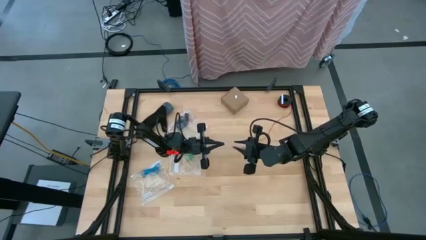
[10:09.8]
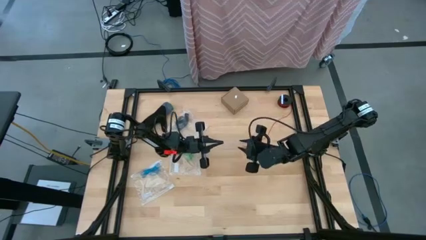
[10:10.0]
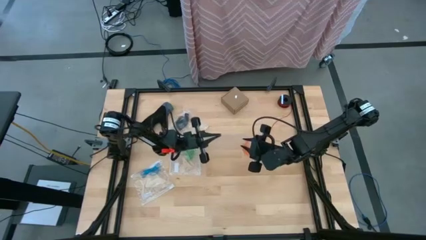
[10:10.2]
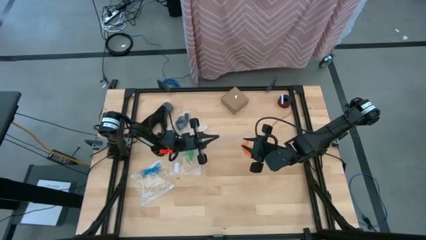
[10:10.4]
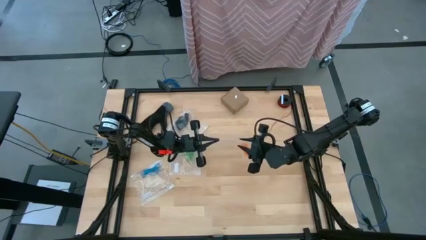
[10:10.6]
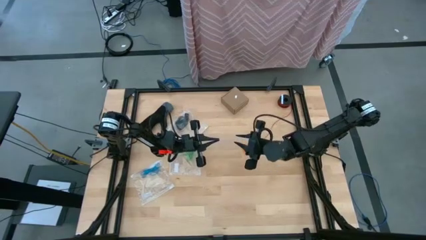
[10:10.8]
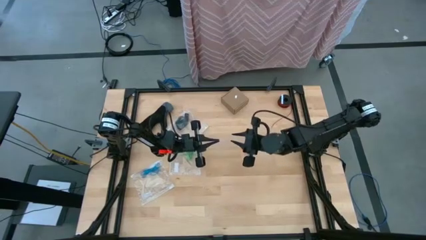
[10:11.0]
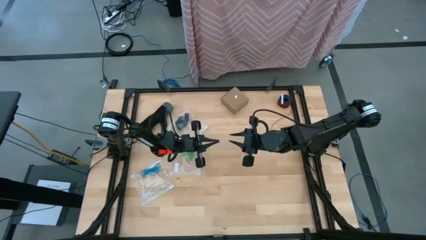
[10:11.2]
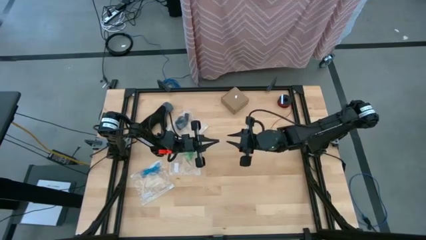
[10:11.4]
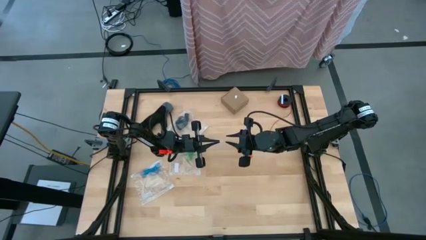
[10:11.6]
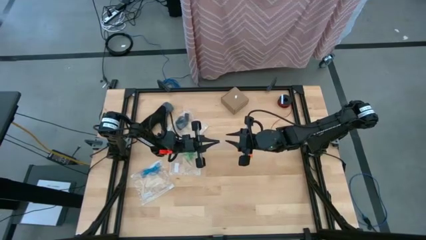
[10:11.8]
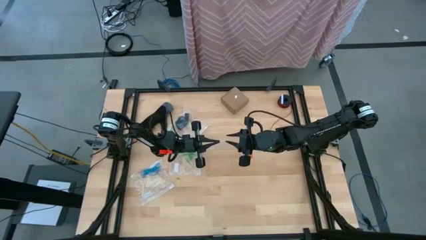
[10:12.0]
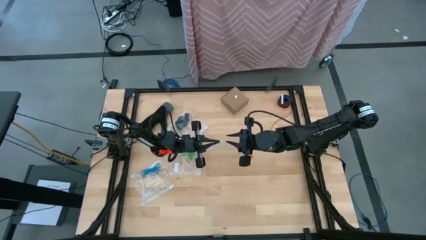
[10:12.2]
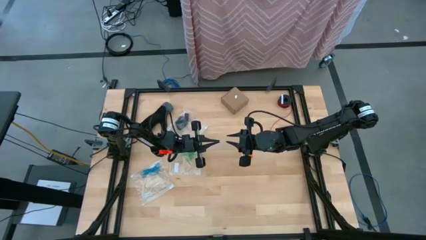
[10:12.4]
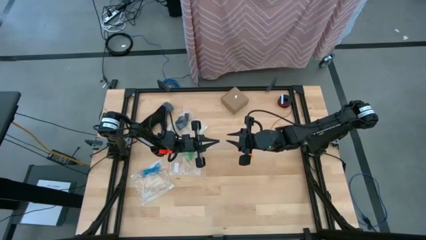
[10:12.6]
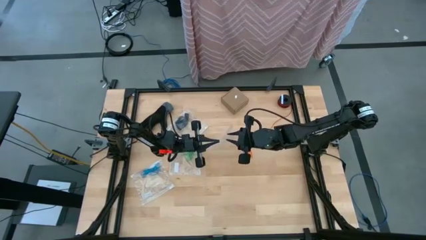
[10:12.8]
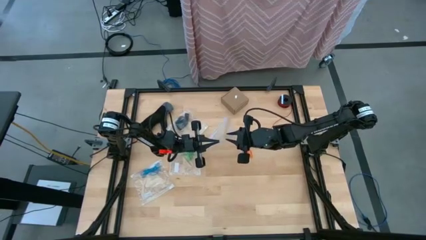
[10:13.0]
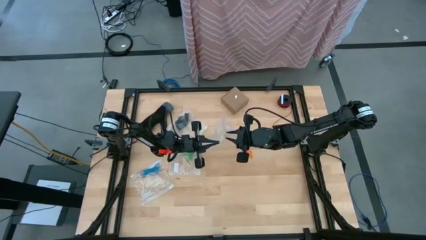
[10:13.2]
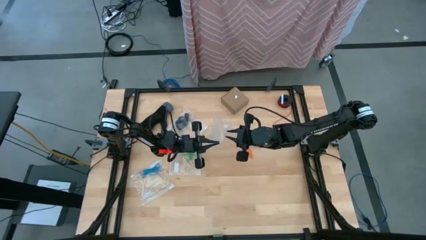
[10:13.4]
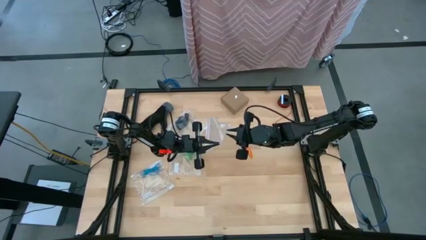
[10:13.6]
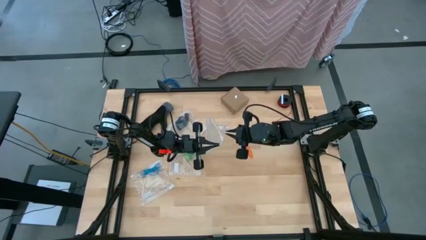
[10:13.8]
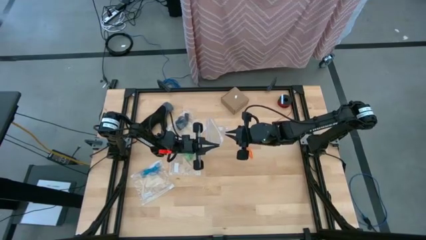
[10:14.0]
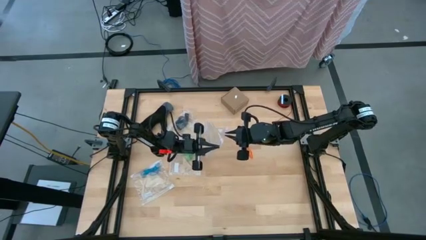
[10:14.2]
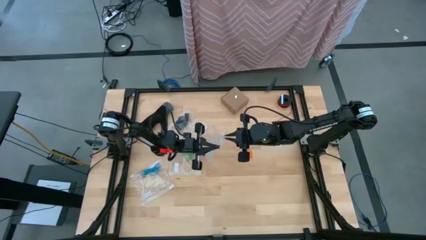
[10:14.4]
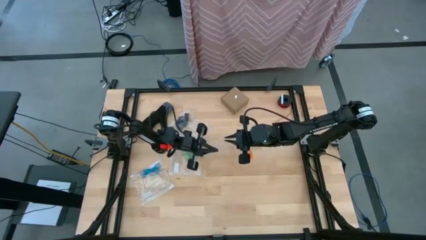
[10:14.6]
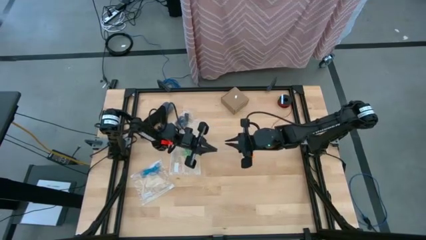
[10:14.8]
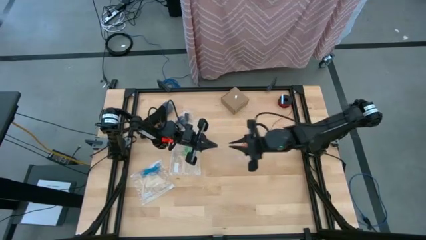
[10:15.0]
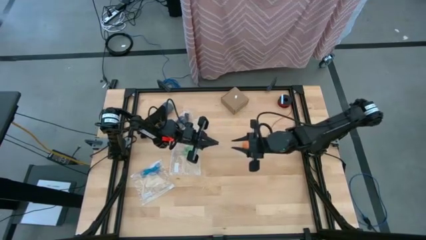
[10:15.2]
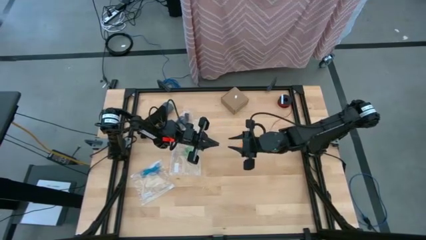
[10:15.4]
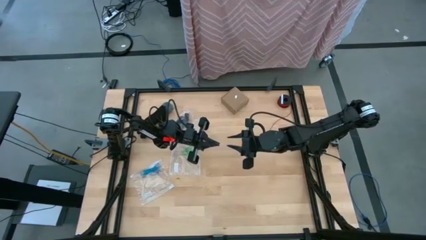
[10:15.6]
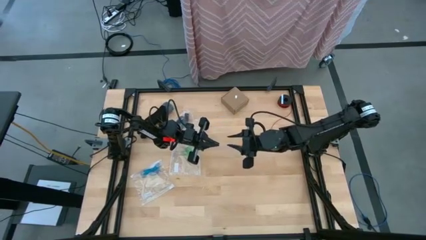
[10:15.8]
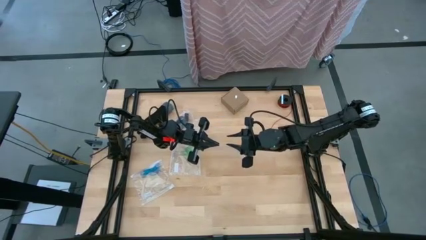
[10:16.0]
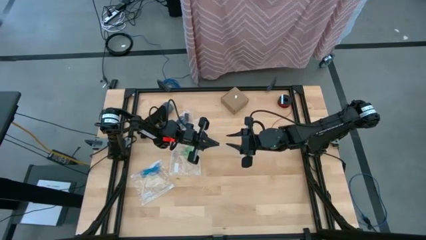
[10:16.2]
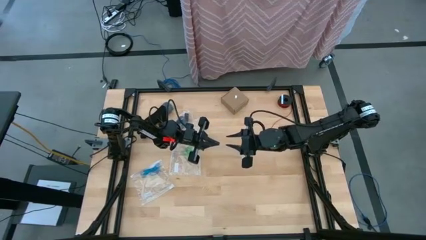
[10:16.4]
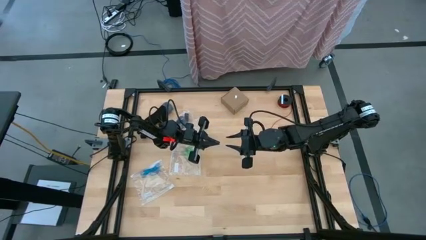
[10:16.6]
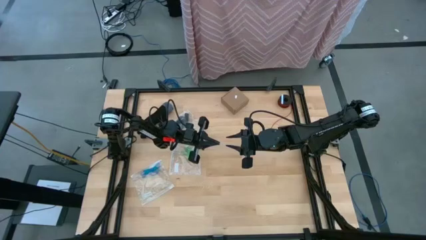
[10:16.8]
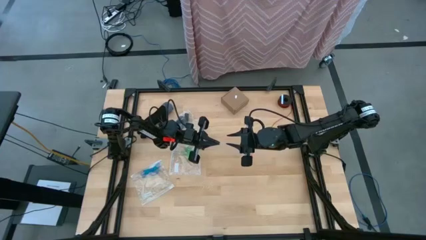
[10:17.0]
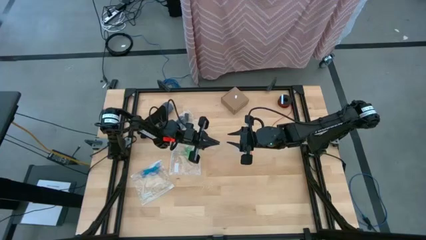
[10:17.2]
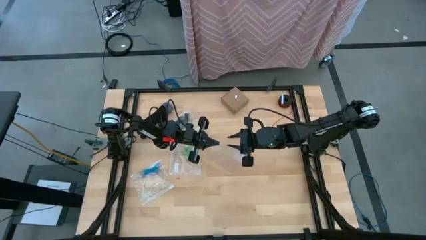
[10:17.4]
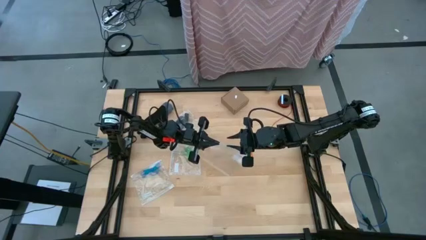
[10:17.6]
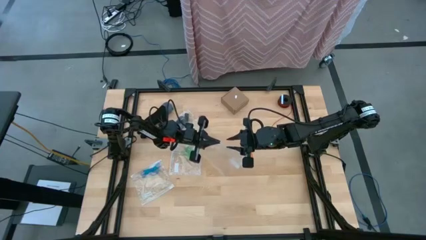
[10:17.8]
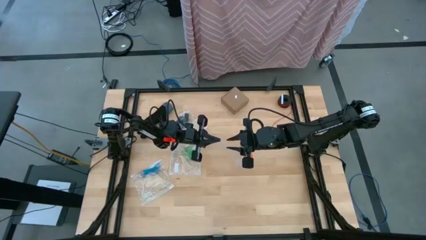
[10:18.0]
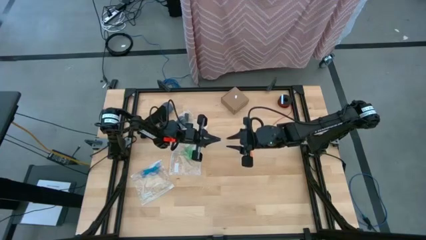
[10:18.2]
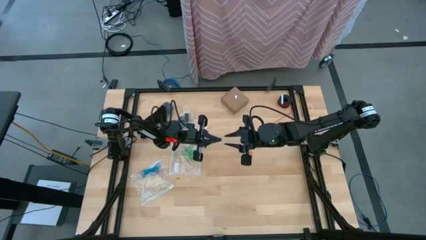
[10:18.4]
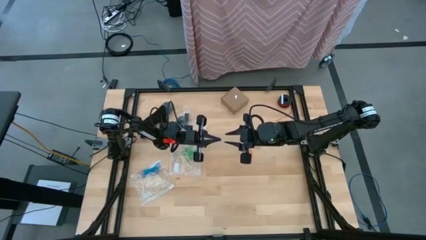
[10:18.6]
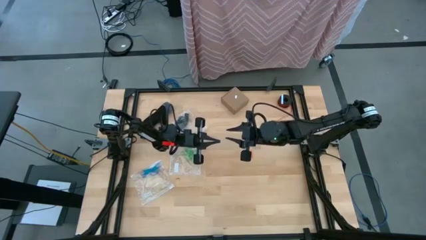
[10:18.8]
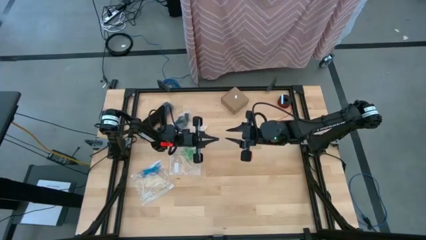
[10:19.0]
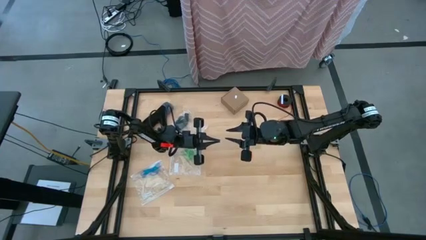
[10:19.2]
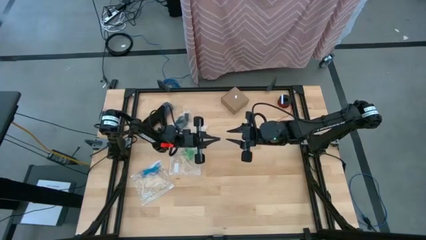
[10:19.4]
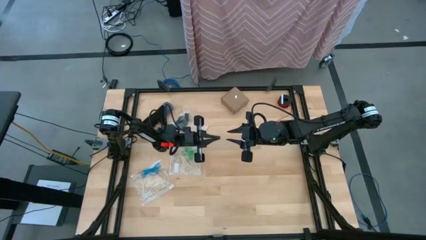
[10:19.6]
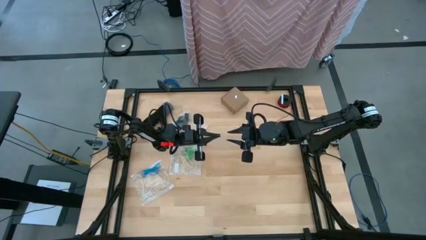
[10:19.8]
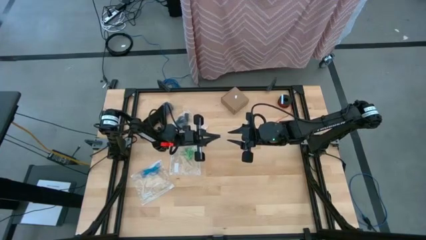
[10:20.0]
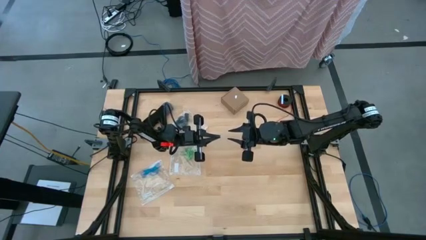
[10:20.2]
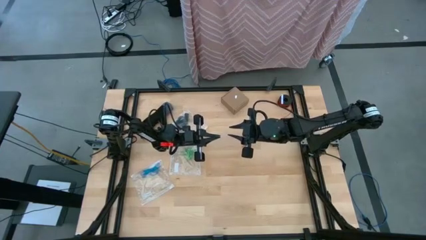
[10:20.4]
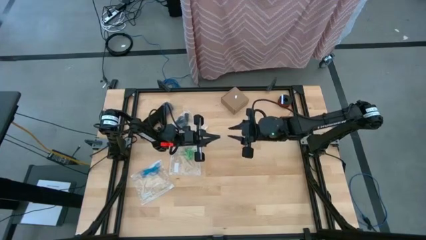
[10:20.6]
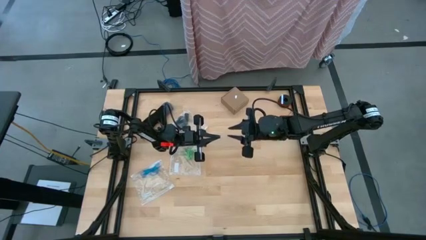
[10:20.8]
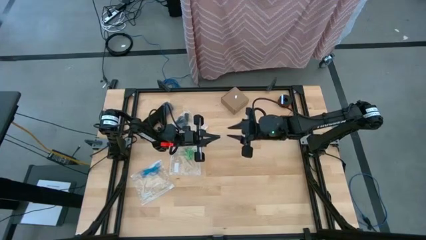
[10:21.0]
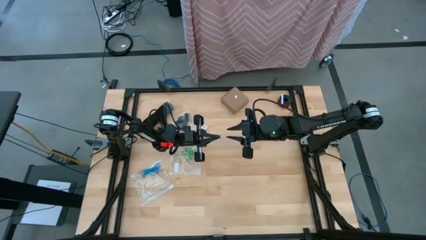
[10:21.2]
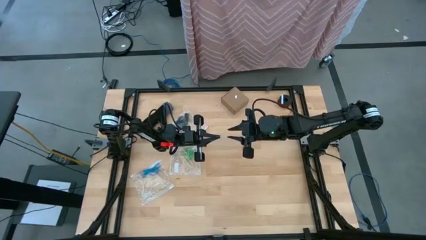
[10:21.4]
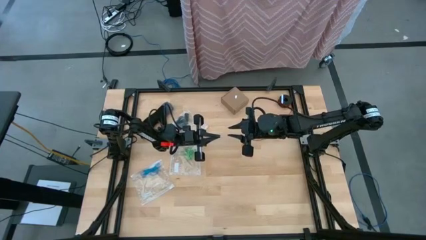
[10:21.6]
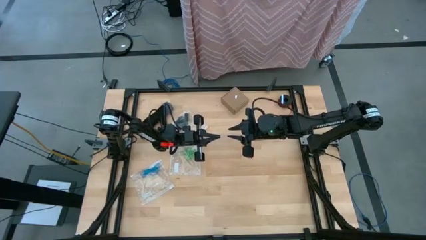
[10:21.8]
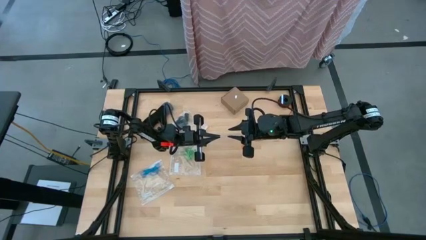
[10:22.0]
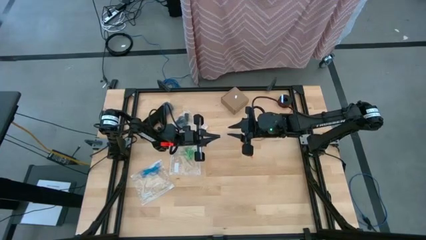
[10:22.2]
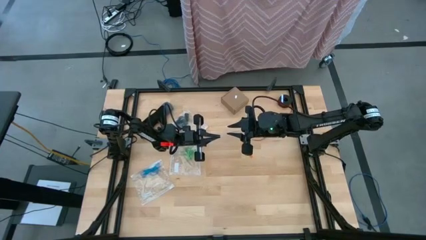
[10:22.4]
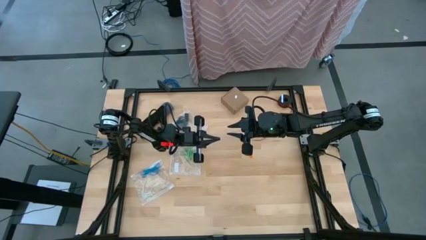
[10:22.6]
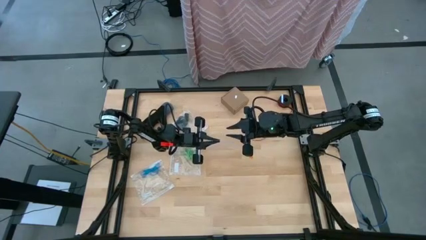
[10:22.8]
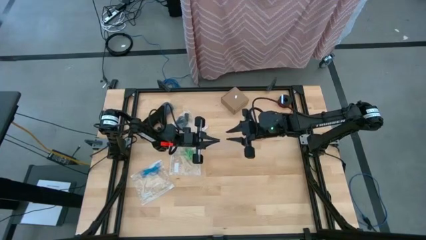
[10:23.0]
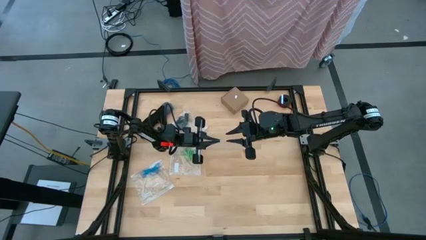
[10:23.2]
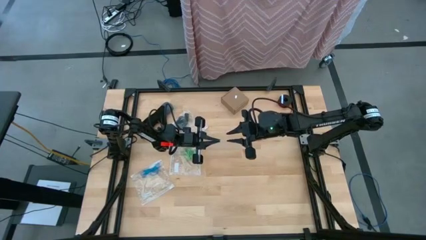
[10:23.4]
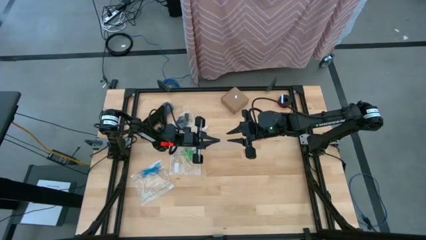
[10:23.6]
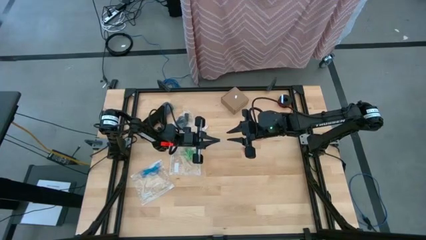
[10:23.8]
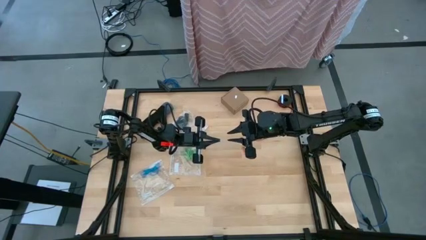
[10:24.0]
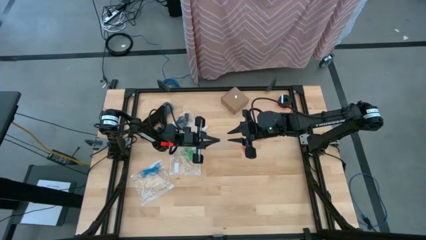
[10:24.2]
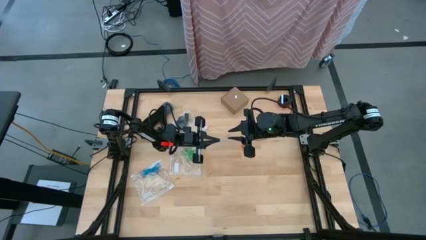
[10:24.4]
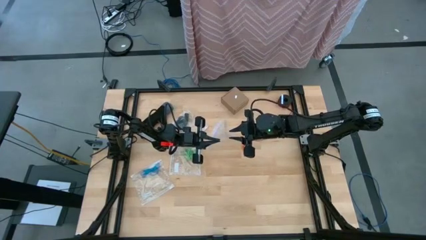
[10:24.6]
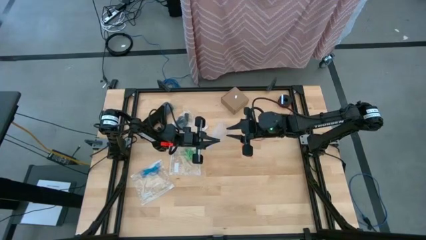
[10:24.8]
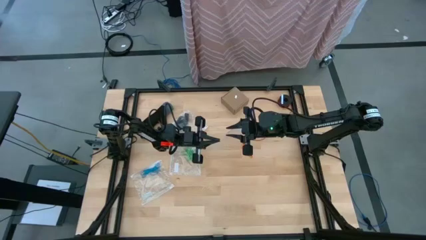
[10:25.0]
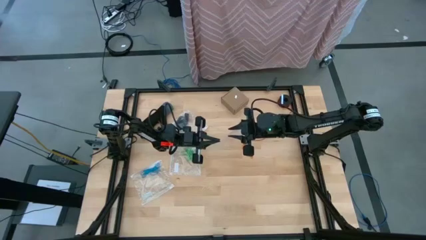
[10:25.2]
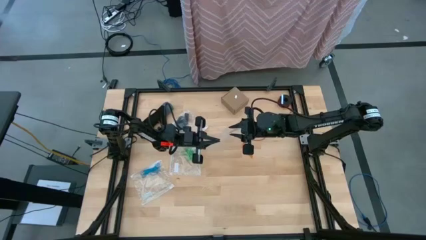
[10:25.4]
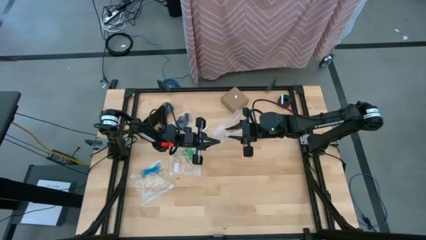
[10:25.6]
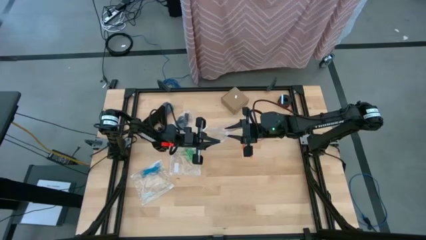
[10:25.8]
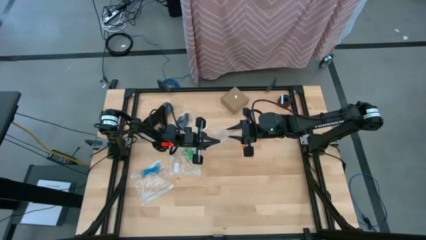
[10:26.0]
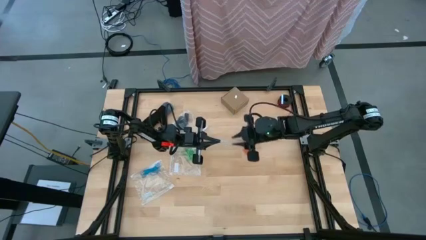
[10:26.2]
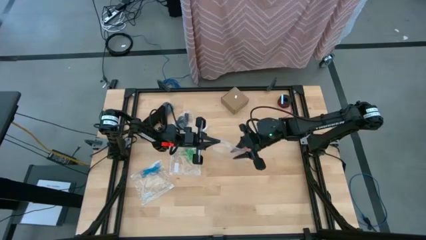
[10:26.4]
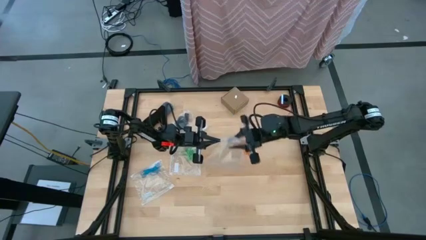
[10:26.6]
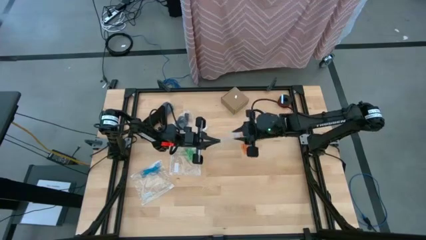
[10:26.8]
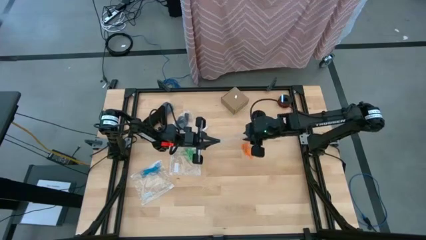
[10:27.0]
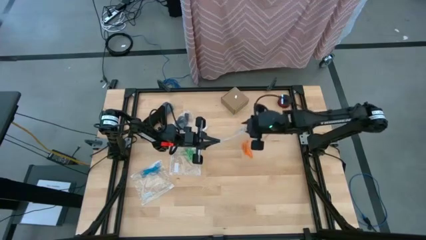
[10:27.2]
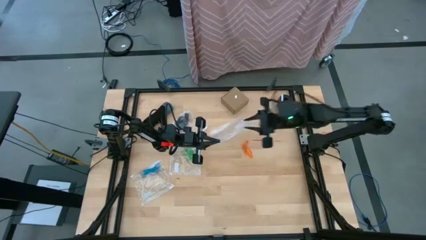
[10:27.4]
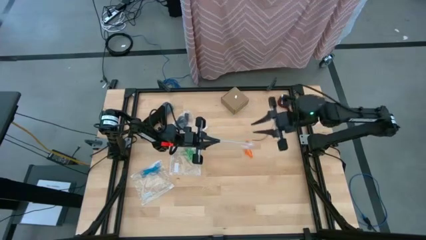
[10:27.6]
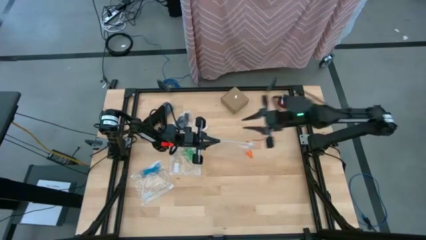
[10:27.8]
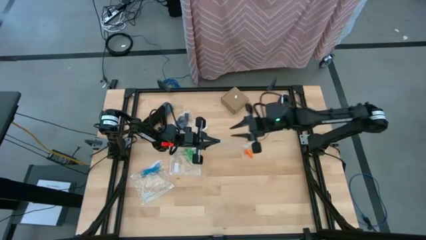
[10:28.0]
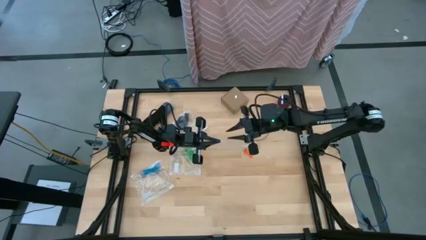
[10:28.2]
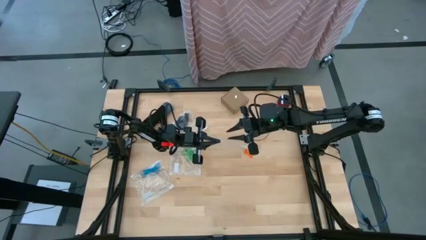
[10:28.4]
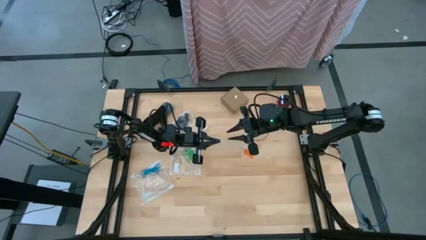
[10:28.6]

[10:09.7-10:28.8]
Task: Sort rubber bands
Open the transparent zip bag
